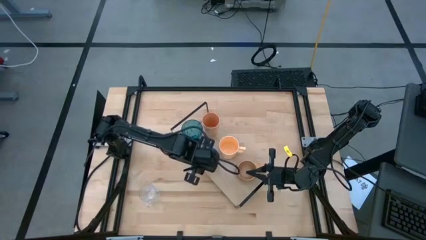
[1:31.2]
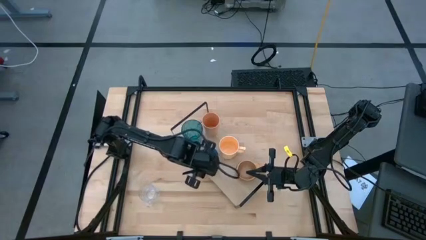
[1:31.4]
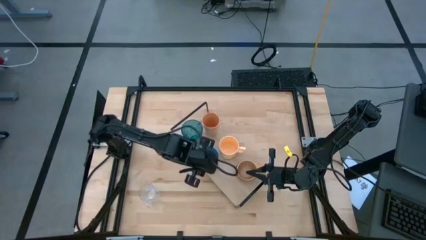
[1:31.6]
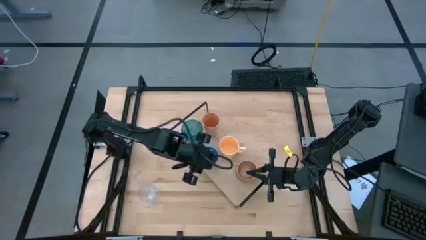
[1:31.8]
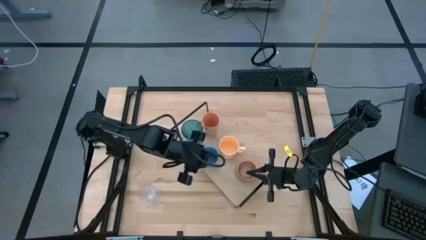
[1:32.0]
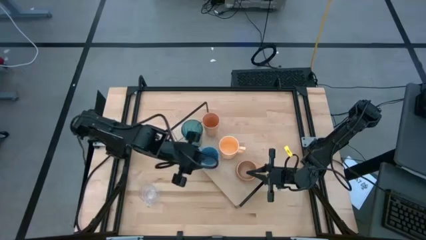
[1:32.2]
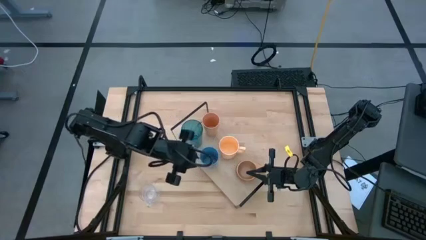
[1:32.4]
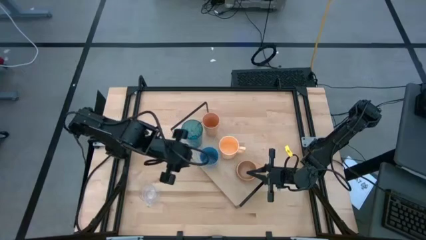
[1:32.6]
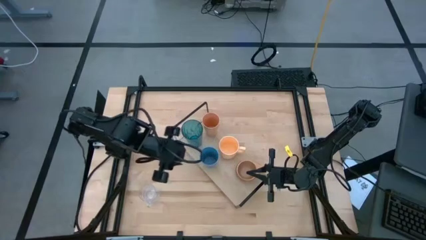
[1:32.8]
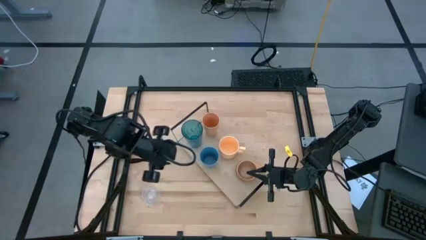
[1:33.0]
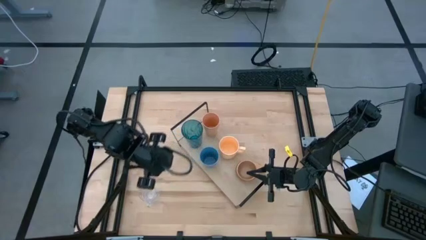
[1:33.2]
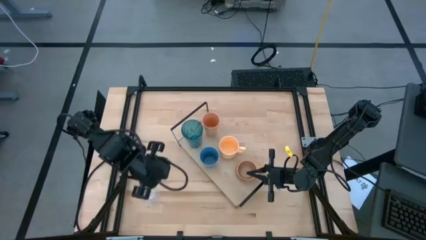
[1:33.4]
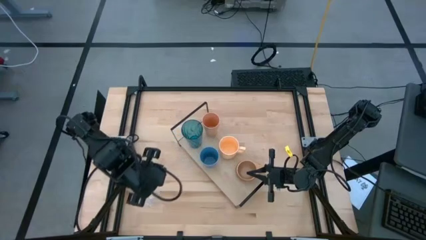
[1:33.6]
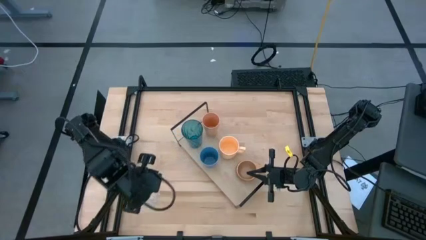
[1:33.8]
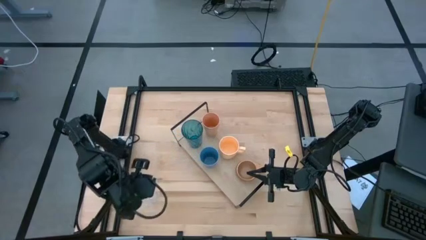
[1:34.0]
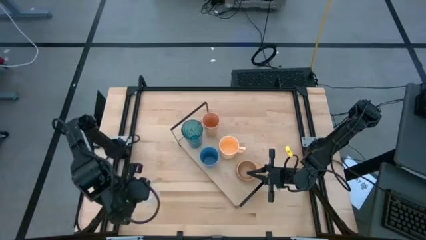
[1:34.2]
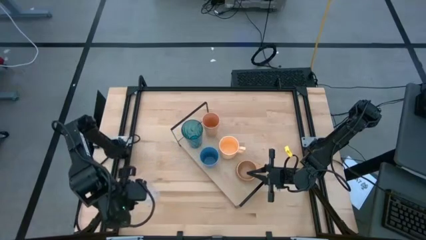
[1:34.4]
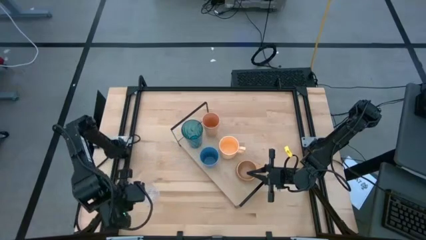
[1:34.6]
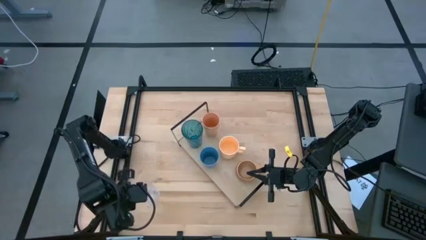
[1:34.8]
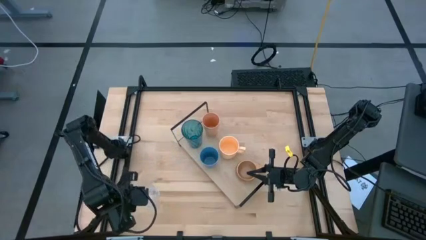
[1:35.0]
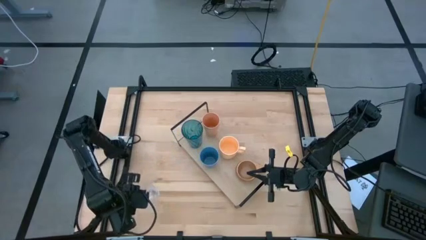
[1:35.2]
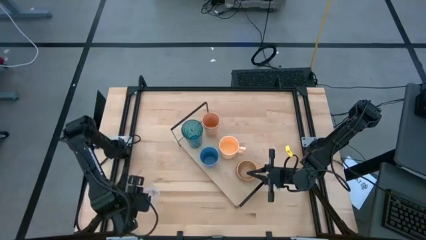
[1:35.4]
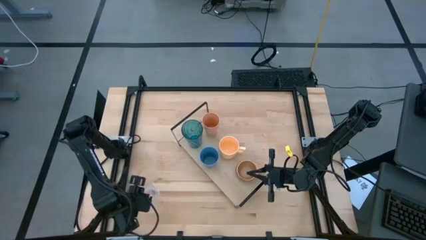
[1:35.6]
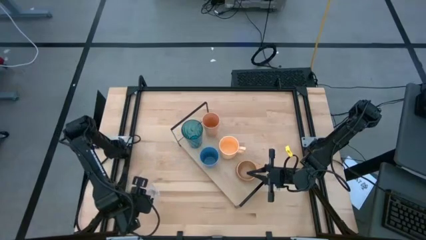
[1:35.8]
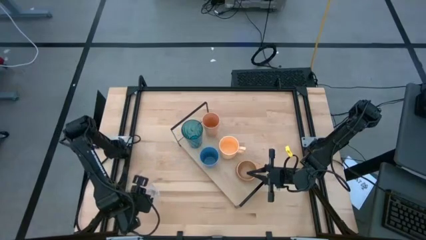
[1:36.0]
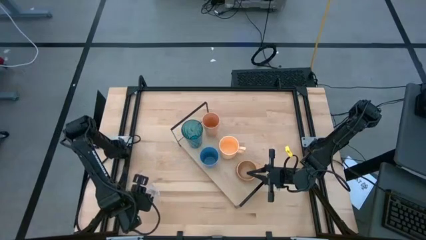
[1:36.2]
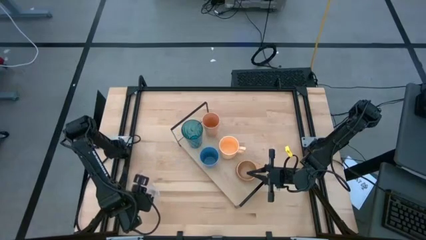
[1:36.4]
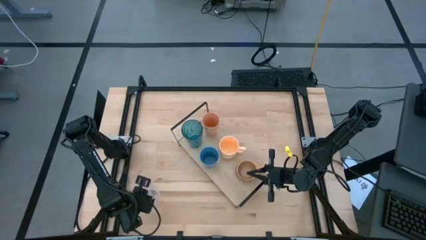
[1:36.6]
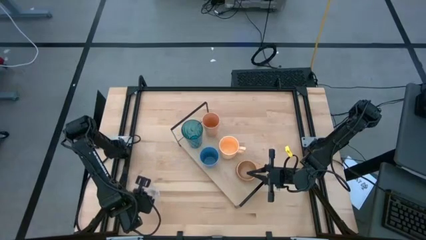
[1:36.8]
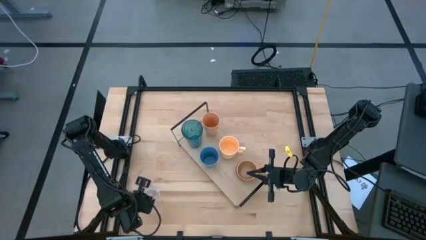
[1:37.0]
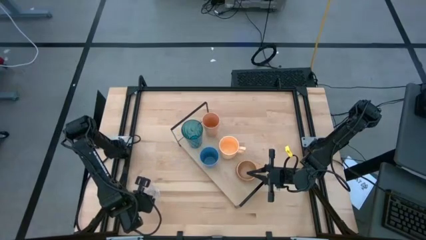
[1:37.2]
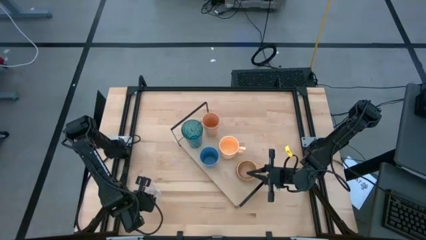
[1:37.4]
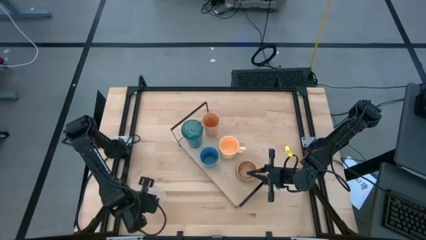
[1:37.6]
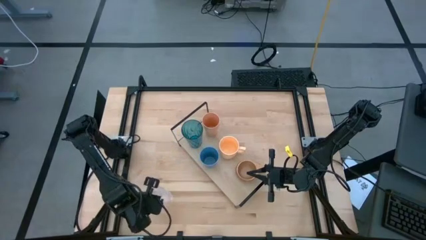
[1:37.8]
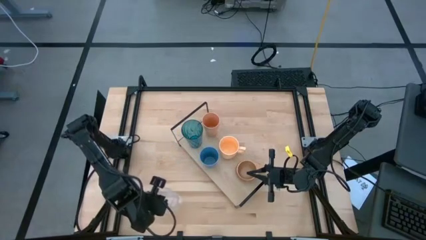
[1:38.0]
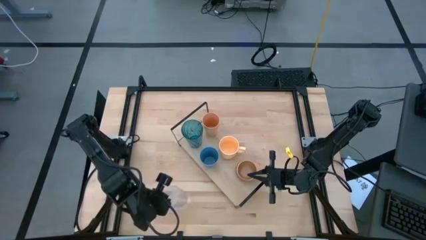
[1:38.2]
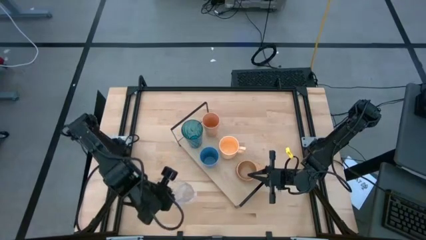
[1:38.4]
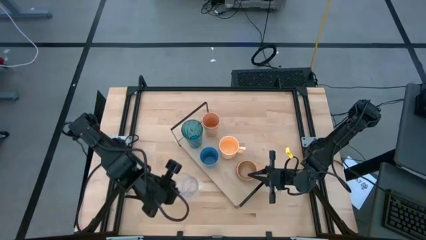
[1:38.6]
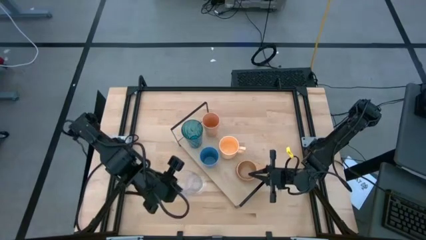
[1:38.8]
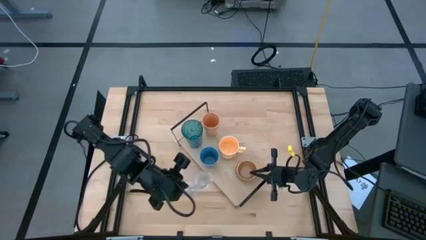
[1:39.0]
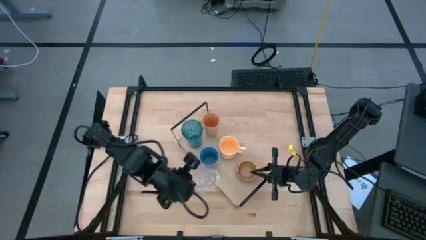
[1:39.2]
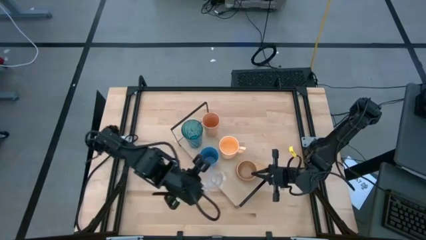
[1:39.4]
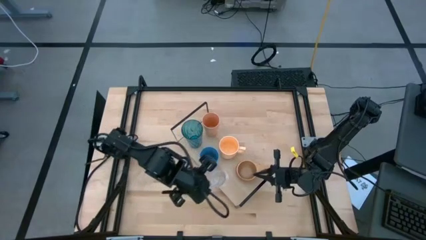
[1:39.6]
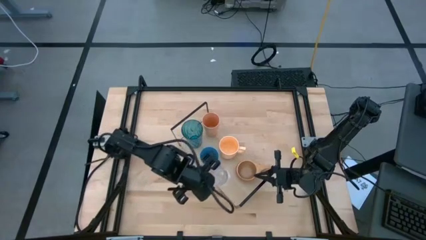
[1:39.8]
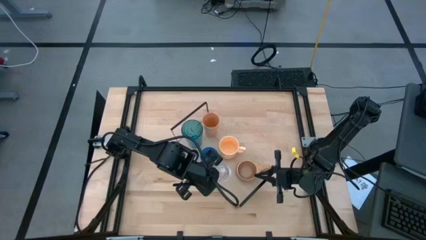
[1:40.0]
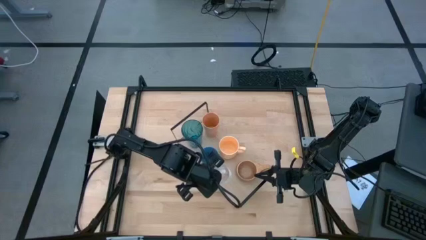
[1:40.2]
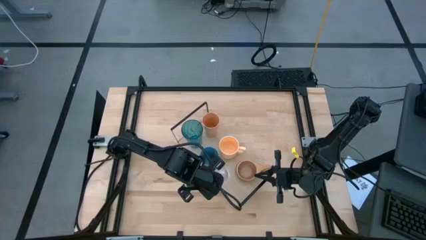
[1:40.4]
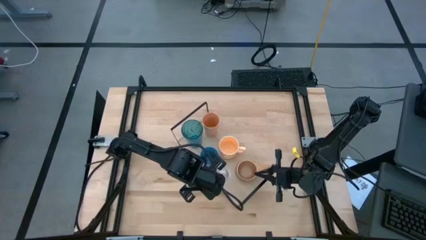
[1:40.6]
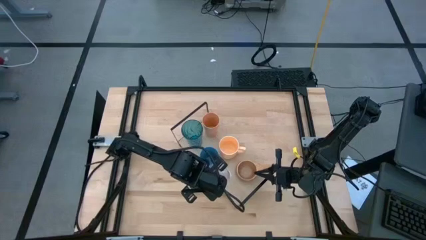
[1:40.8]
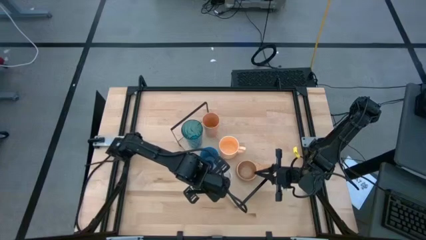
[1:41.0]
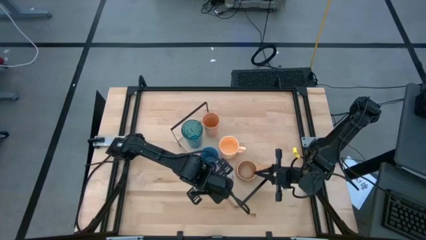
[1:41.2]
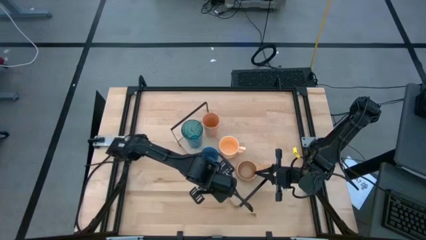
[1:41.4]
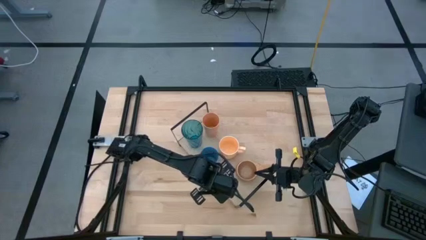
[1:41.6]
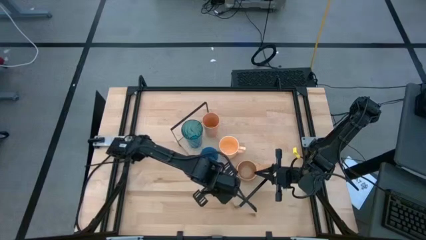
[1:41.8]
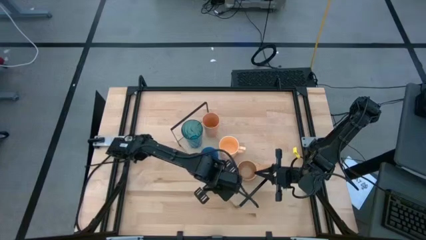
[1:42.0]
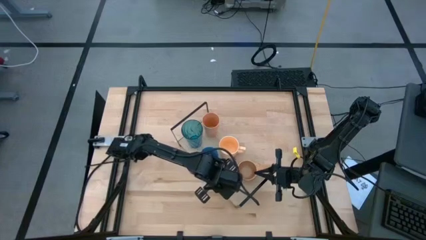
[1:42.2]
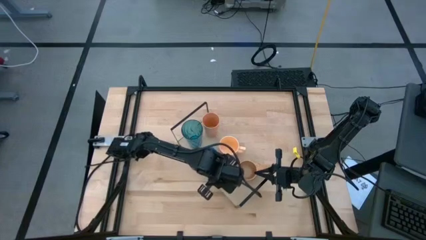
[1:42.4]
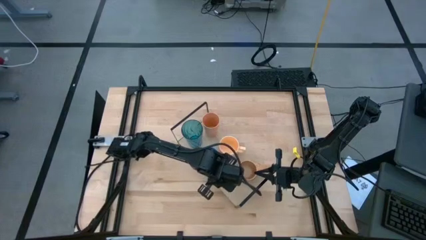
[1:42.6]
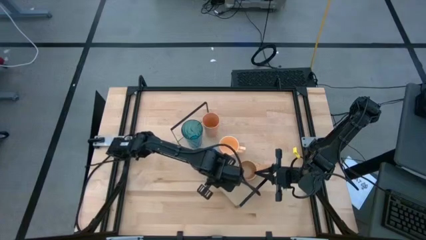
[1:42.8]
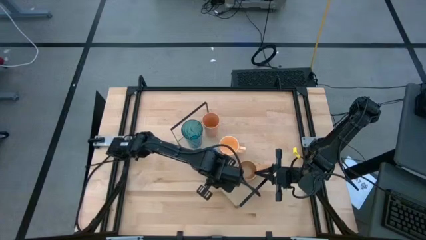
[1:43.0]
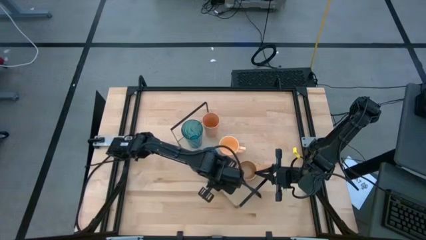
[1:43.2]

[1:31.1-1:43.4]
Task: Stack small to large cups/mugs on shelf
Put the transparent mug on the shelf
